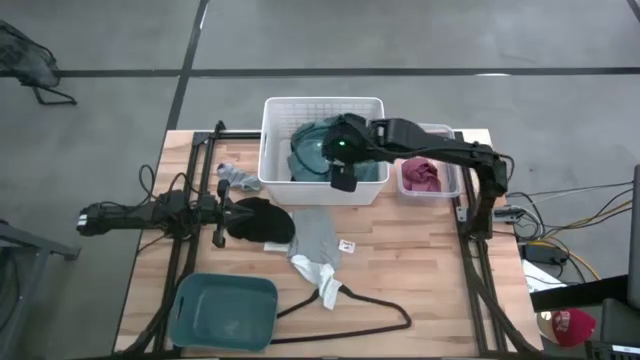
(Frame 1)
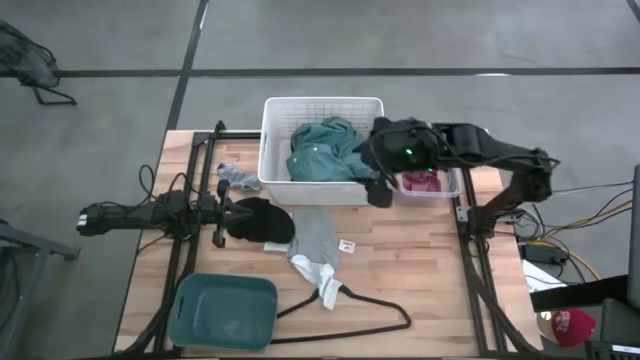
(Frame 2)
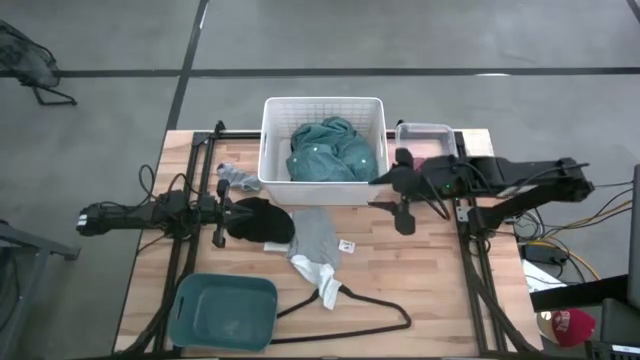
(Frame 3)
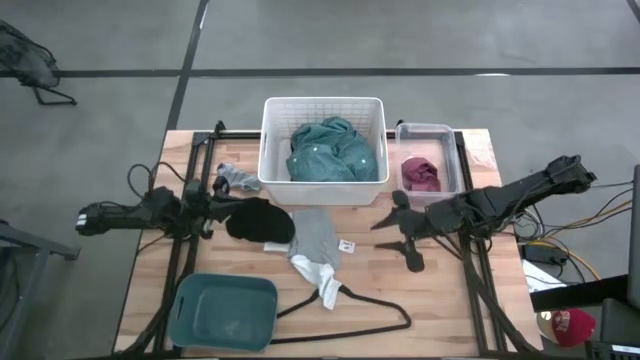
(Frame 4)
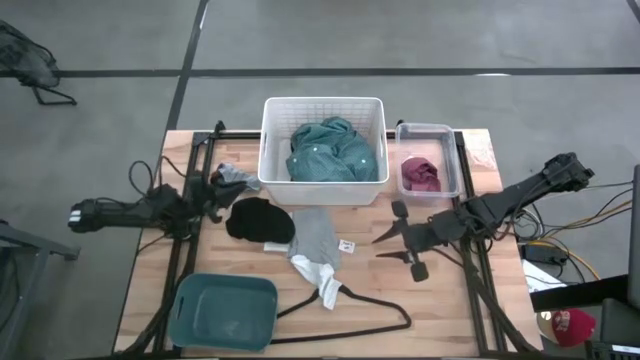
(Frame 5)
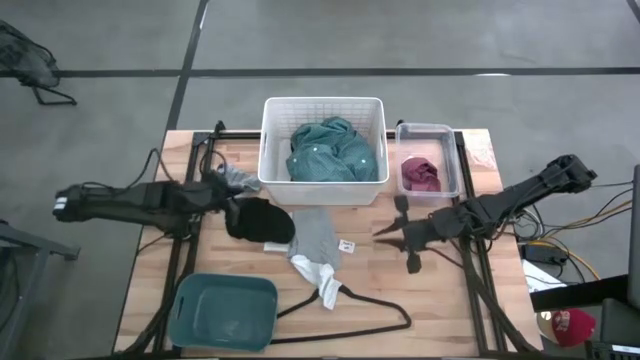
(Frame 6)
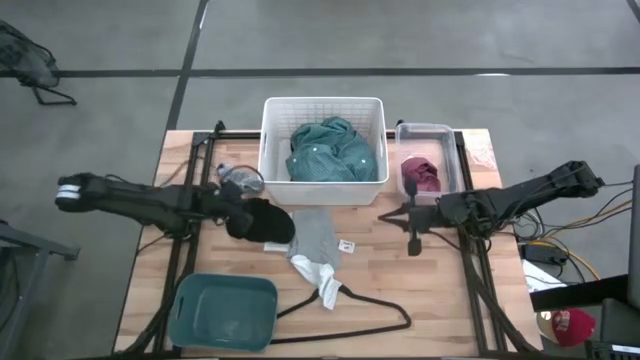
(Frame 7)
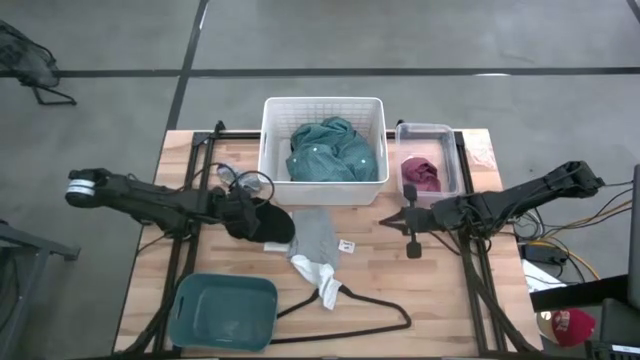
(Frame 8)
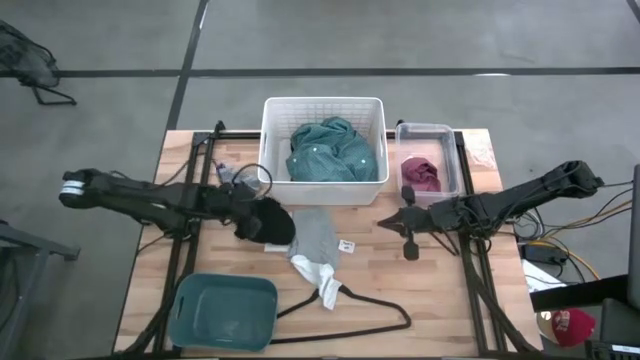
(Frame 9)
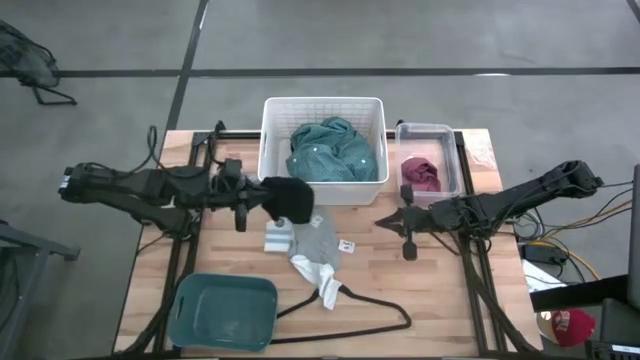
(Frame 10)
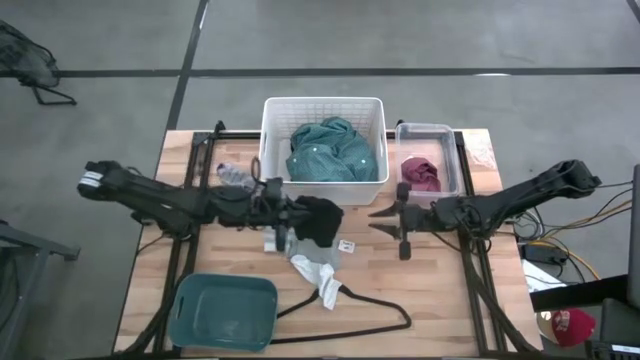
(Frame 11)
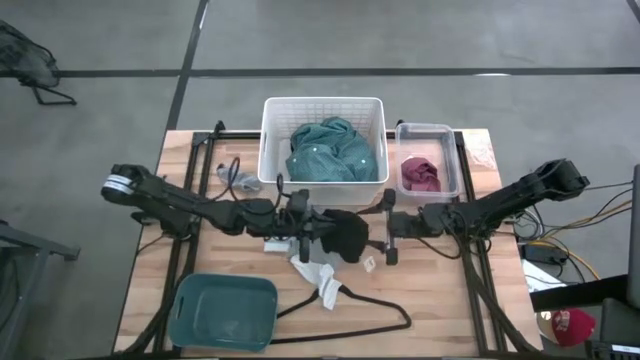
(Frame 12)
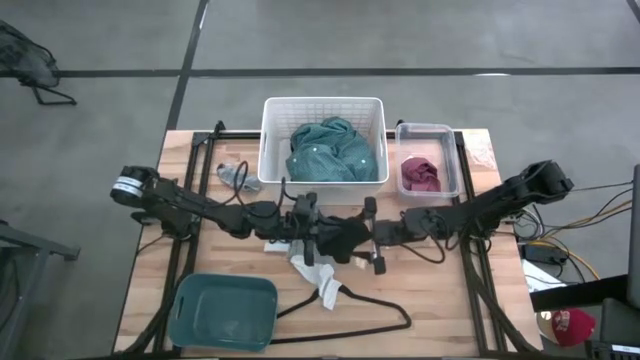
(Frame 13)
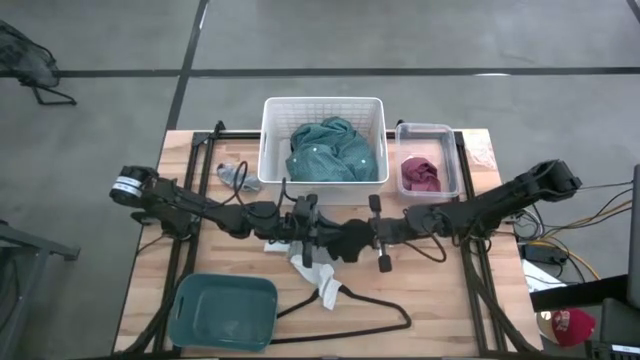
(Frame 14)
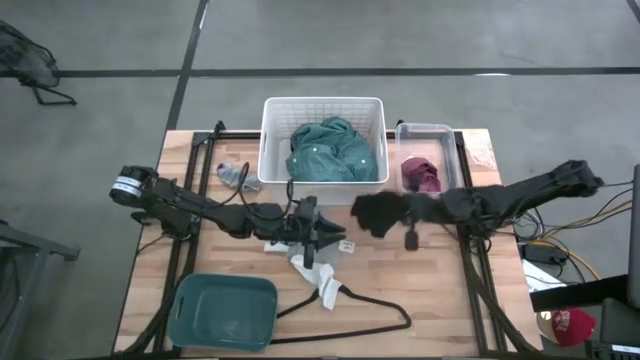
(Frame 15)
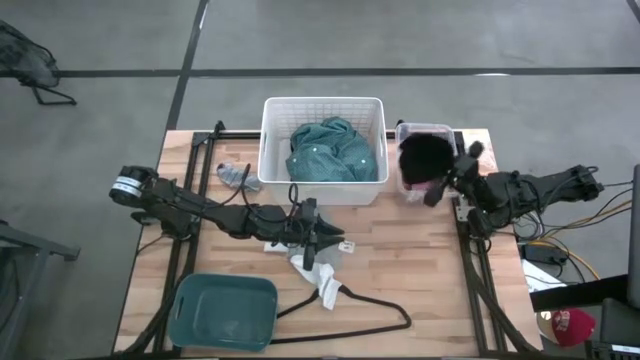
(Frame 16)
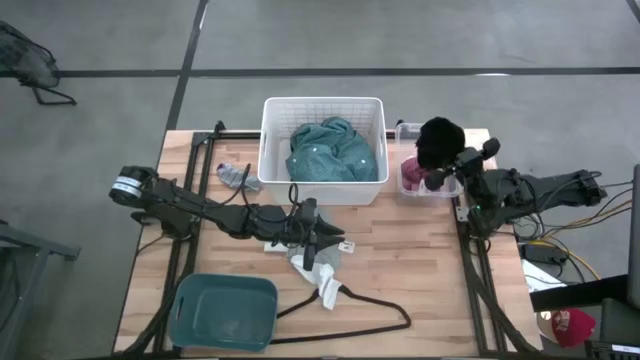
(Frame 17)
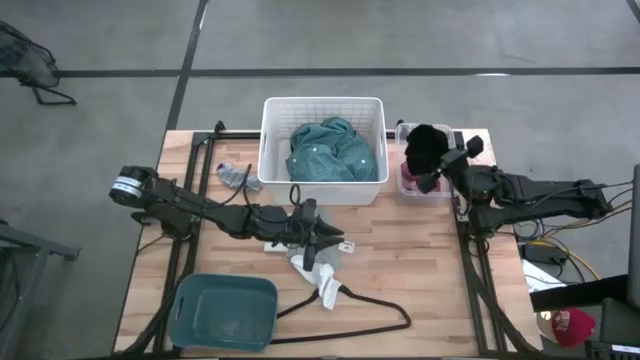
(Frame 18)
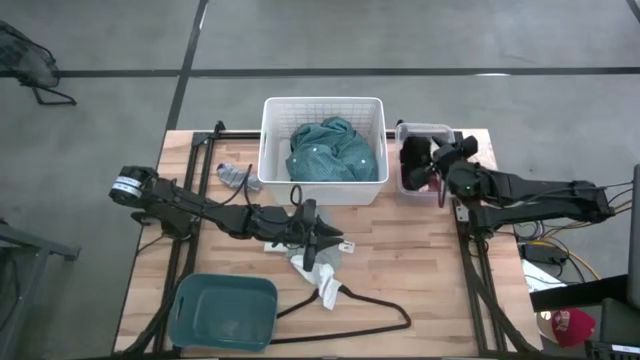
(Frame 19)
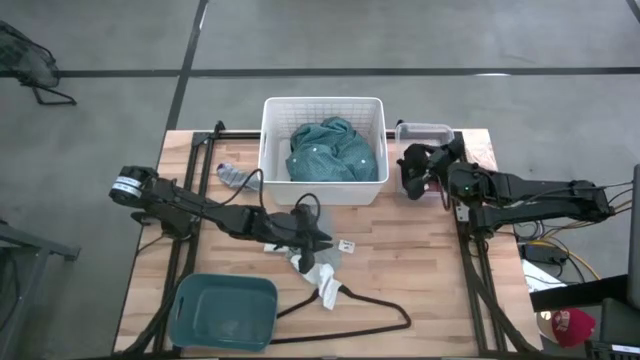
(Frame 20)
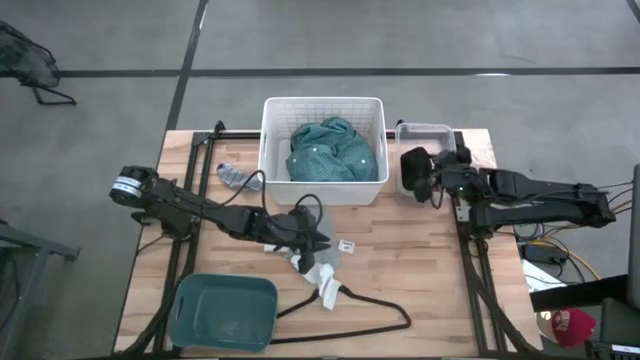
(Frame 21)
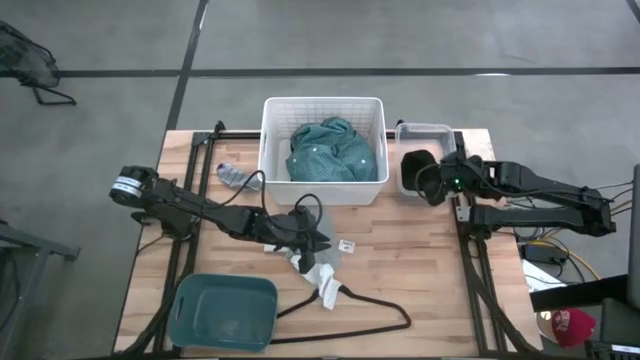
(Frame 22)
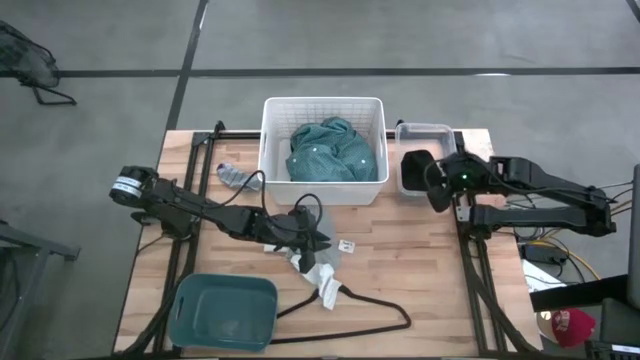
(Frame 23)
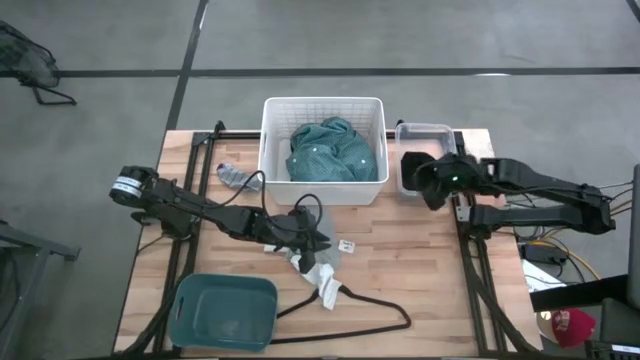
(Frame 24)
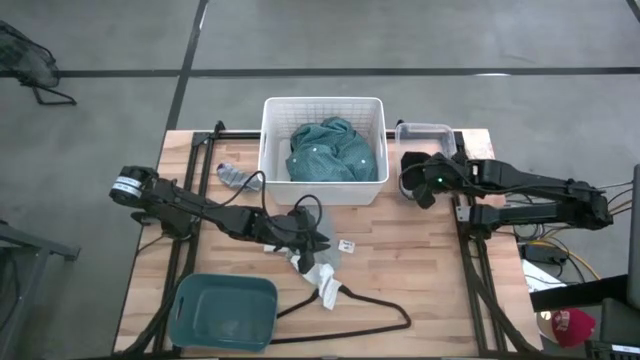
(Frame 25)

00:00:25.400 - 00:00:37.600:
Task: Pick & Place Cloths
Put the black boxer into the transparent bin

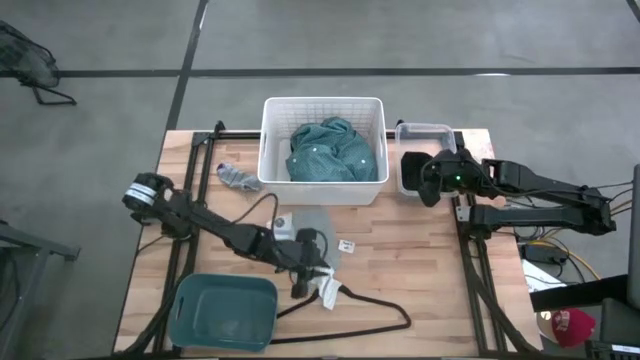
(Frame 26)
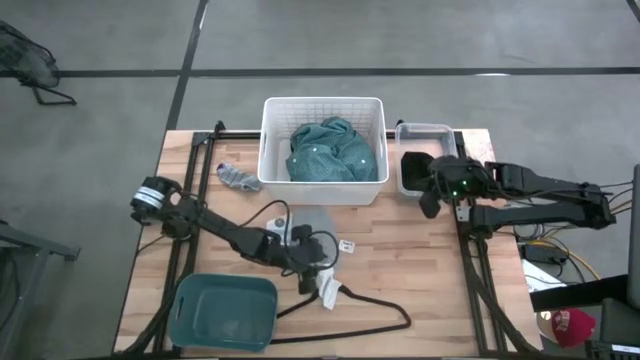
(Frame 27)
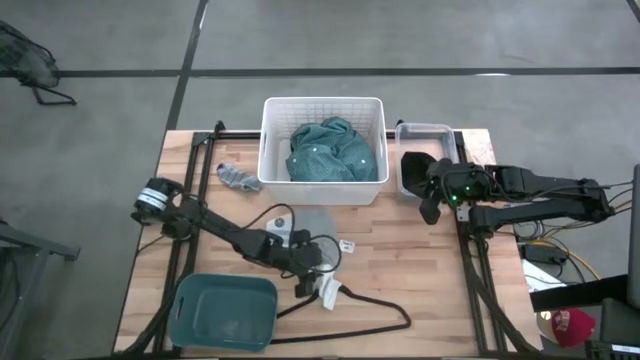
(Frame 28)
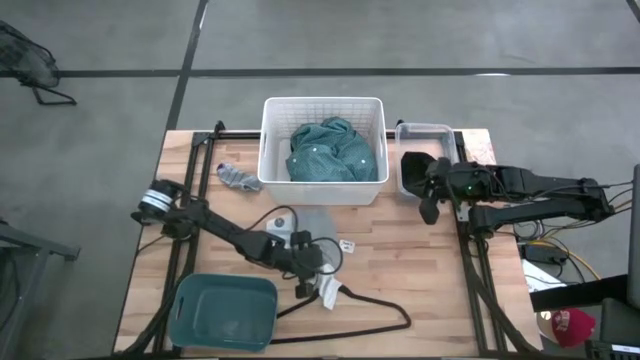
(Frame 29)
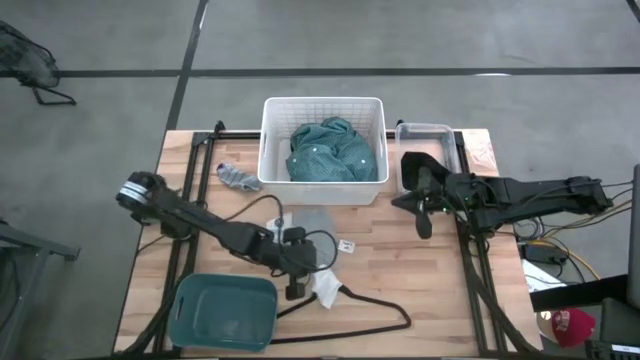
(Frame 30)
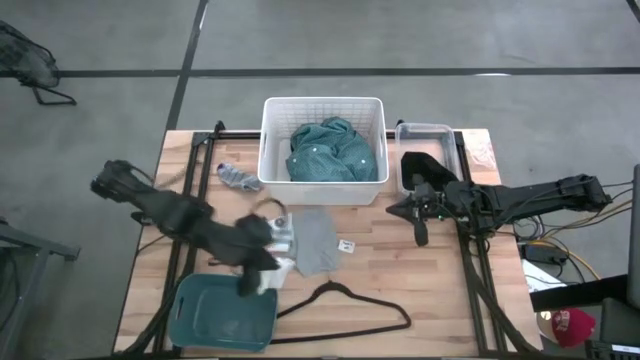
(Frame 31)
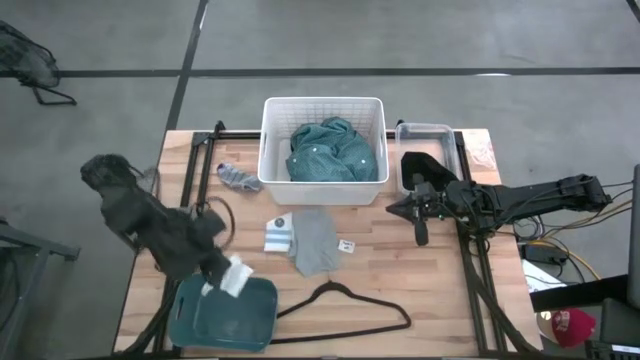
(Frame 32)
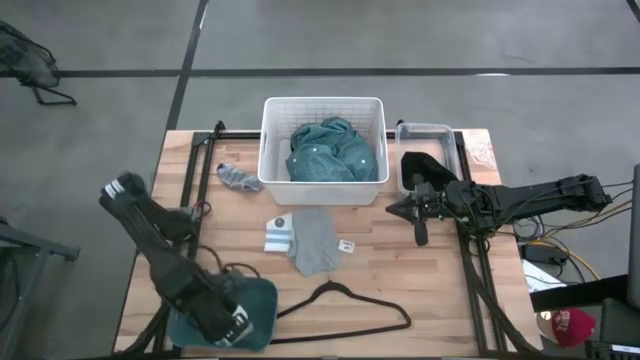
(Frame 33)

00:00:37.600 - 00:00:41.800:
Put the bottom white sock into the dark blue bin

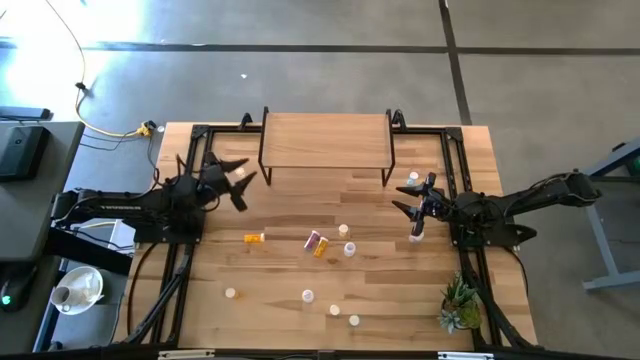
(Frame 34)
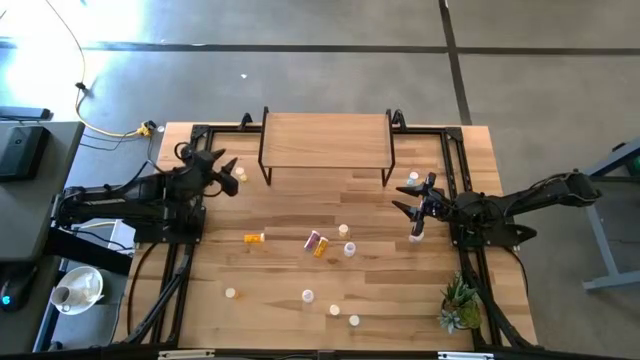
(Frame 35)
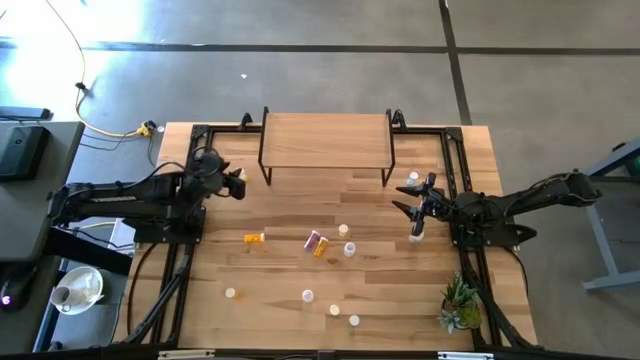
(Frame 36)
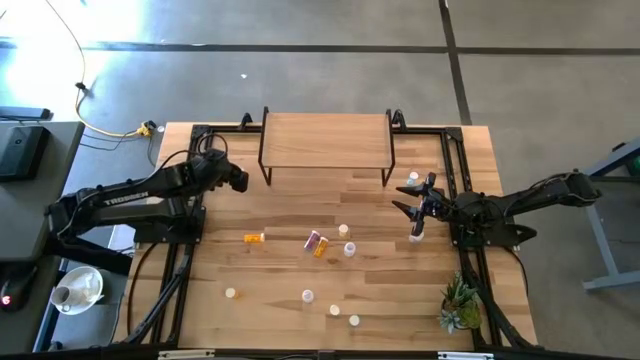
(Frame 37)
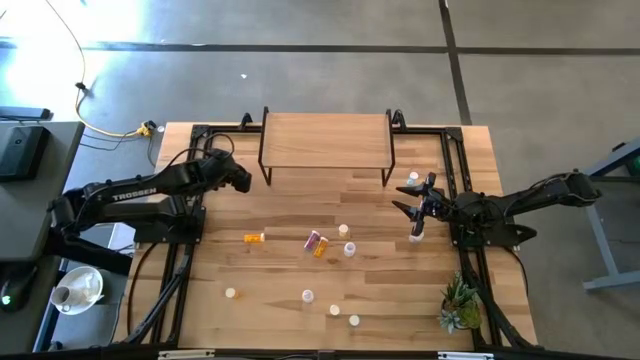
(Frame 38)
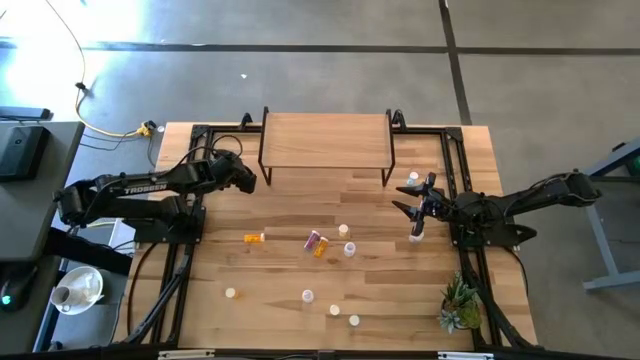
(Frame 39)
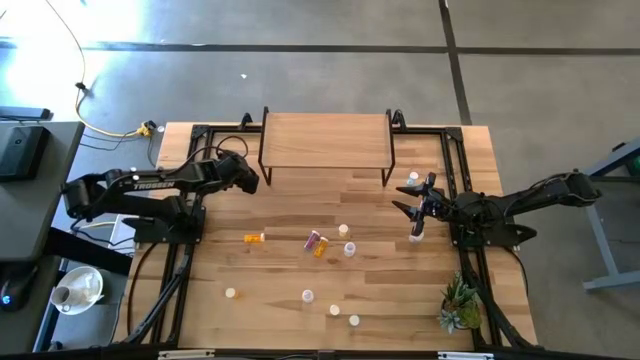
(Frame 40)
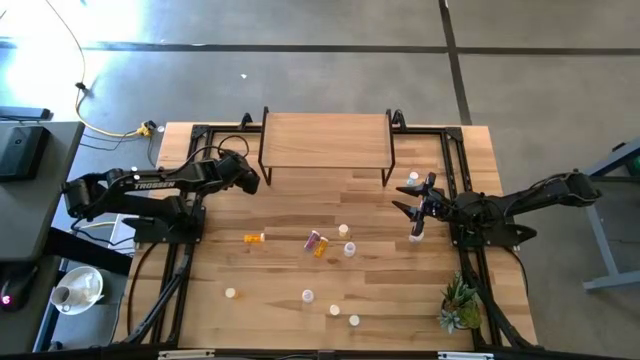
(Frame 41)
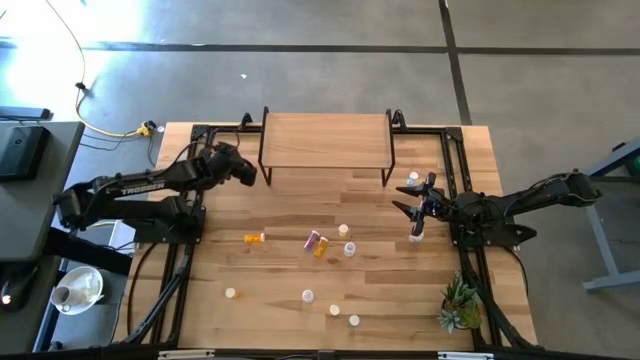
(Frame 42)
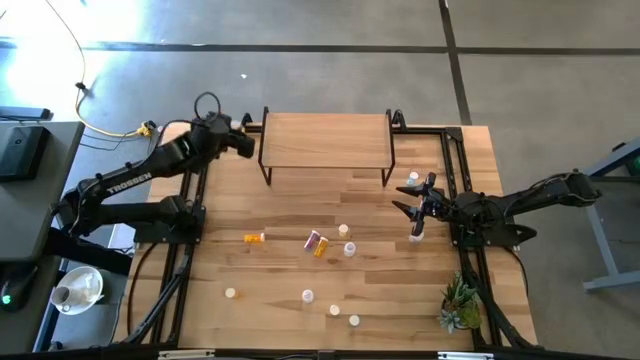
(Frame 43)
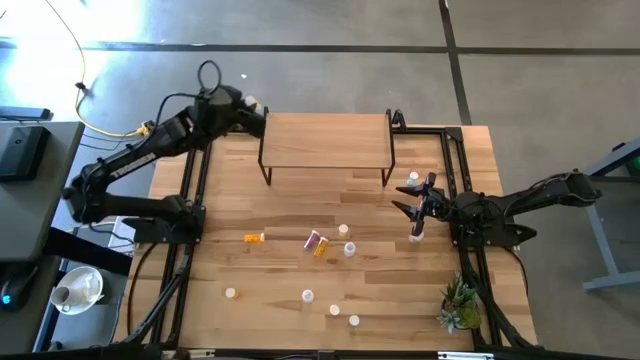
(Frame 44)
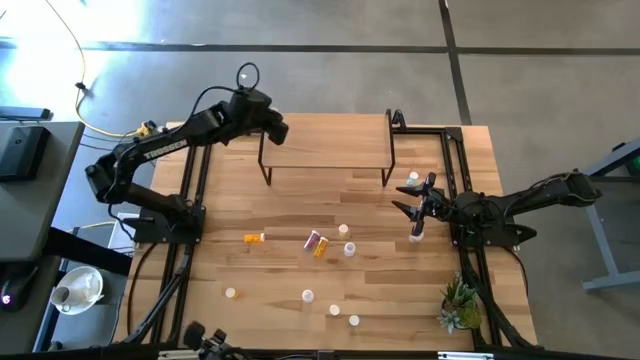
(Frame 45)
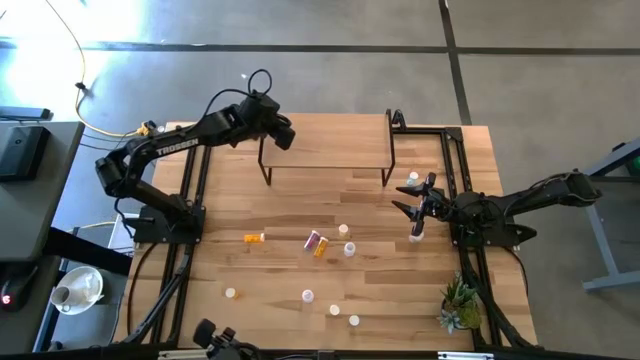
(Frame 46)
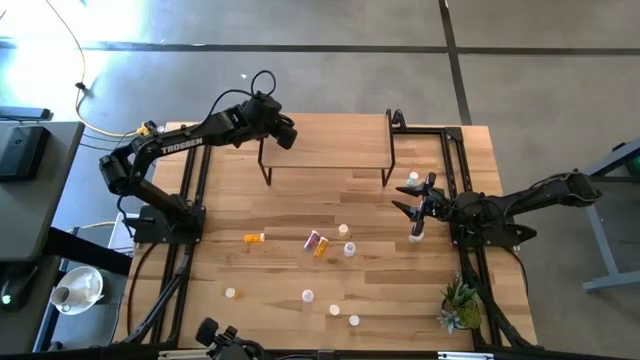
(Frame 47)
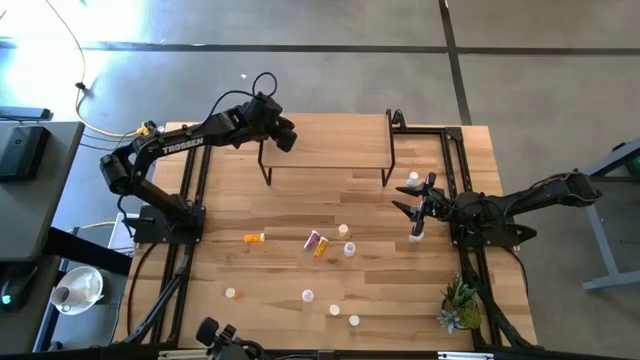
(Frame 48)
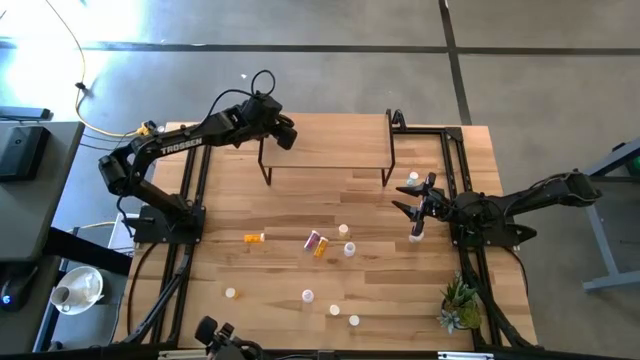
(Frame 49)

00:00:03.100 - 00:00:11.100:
Task: Pick and place medicine bottles onto shelf by color
Put the top yellow pill bottle on the shelf
